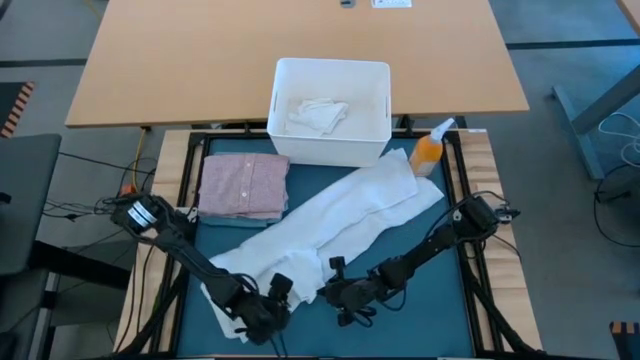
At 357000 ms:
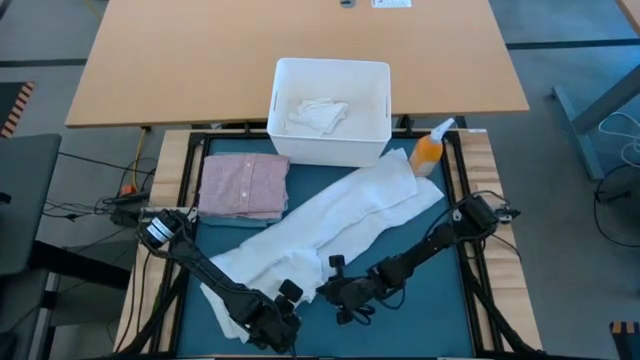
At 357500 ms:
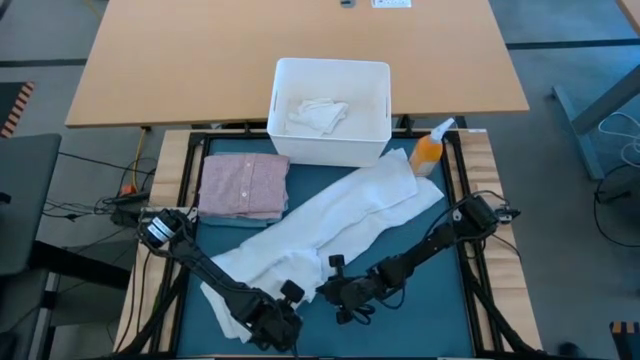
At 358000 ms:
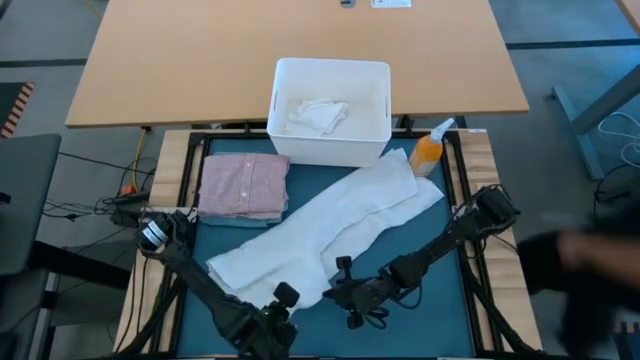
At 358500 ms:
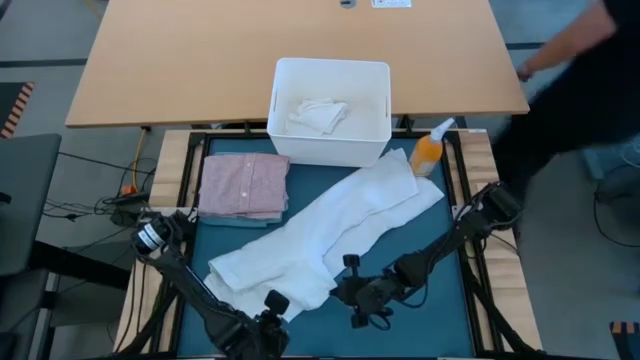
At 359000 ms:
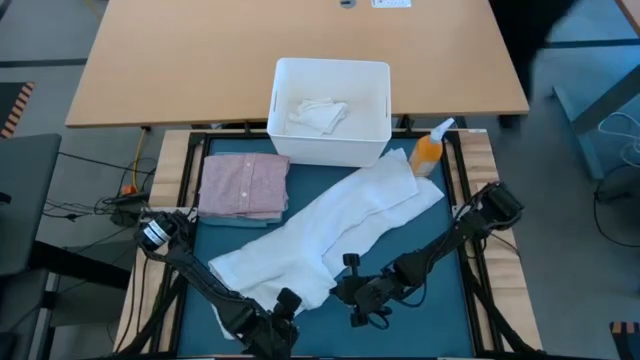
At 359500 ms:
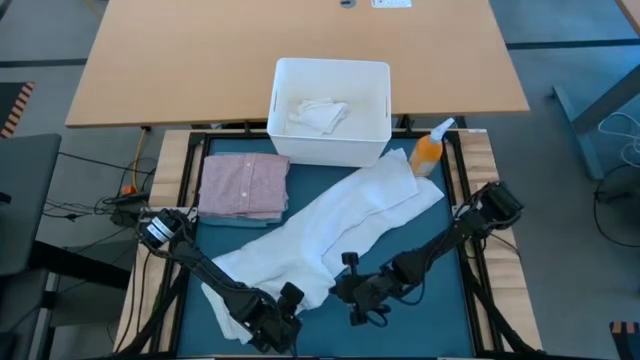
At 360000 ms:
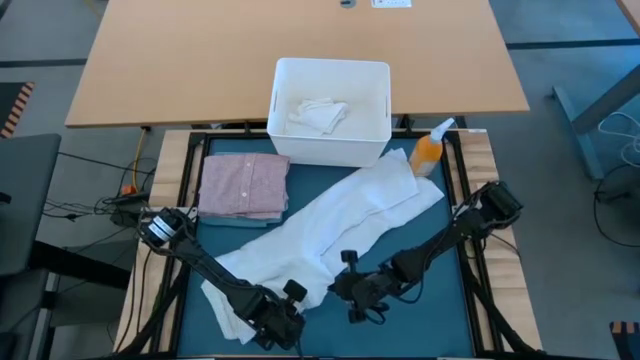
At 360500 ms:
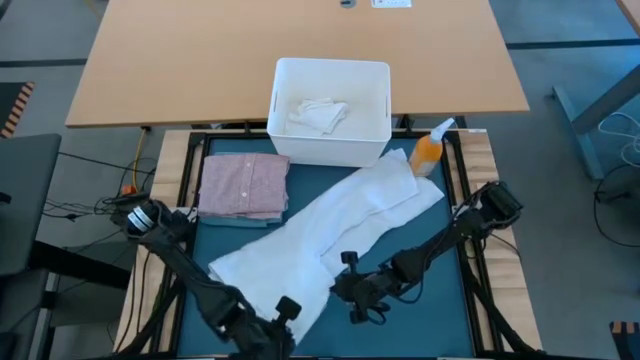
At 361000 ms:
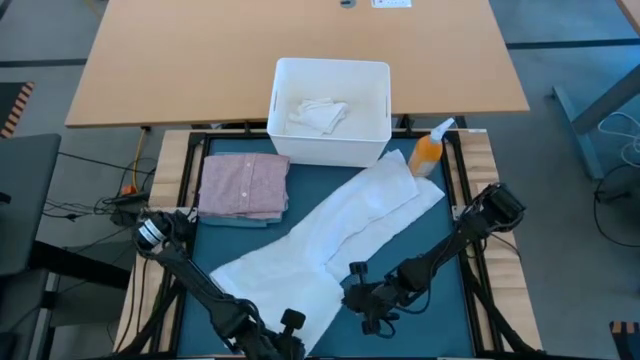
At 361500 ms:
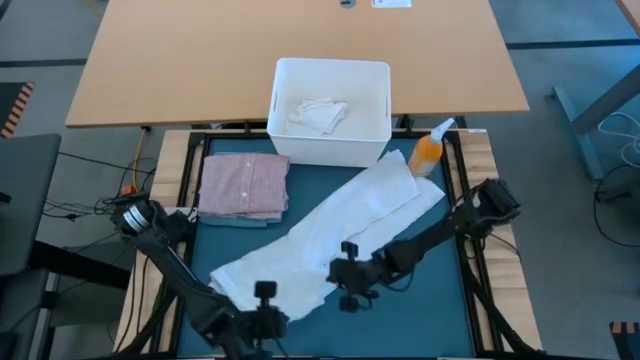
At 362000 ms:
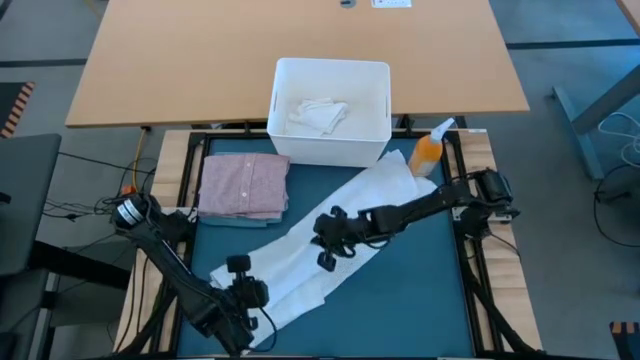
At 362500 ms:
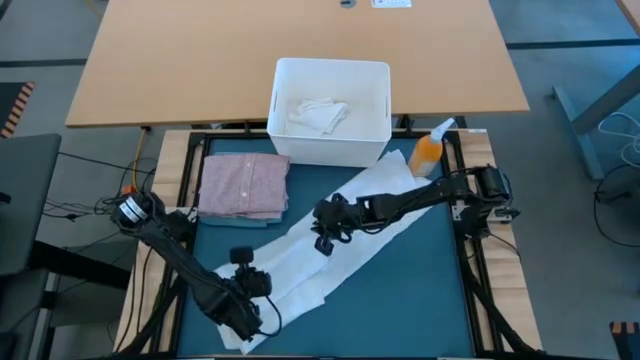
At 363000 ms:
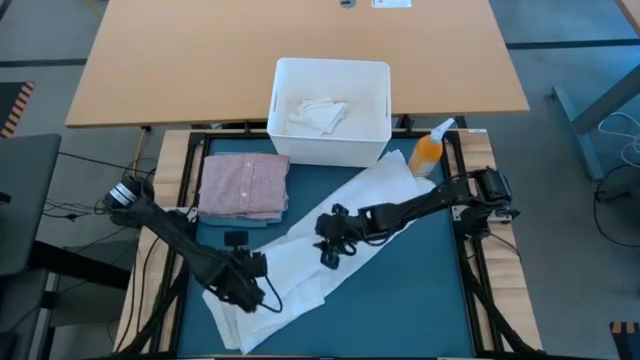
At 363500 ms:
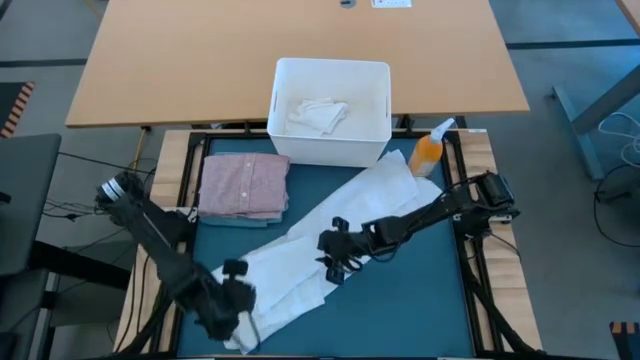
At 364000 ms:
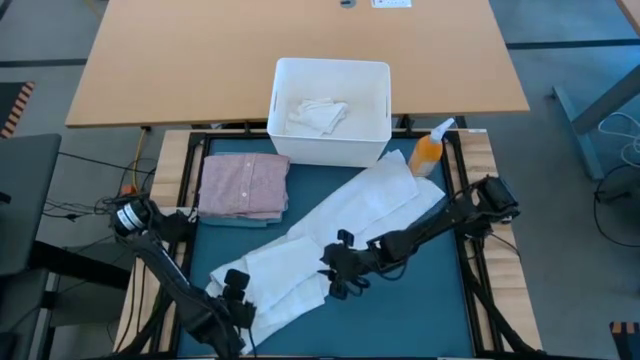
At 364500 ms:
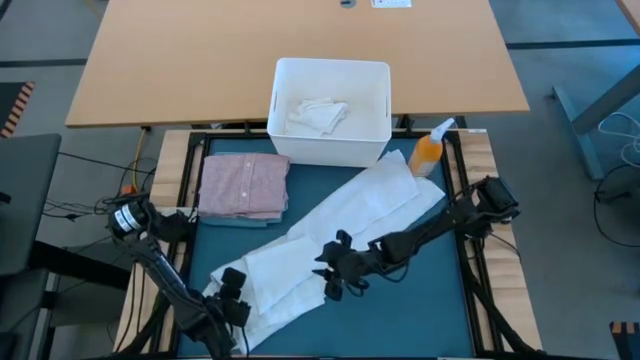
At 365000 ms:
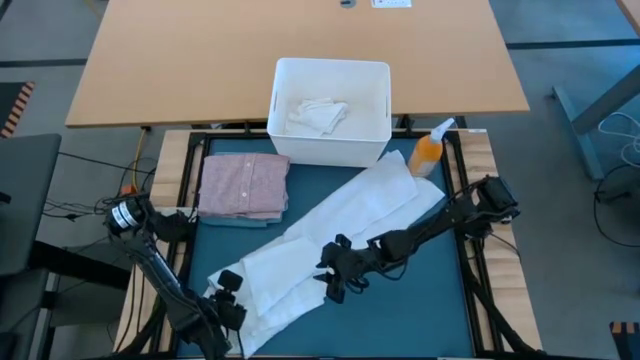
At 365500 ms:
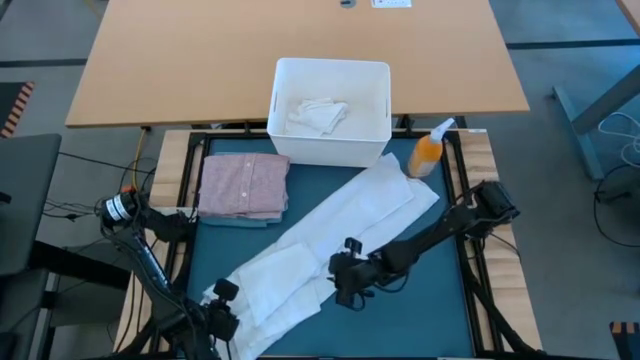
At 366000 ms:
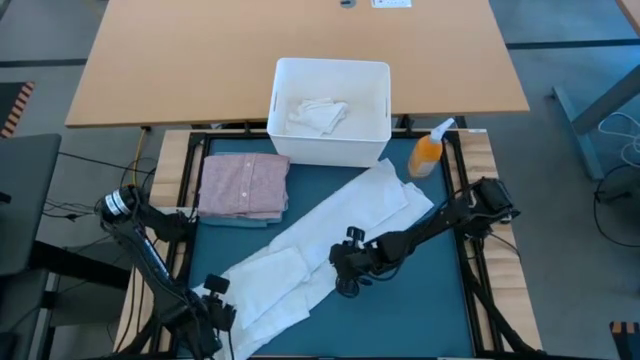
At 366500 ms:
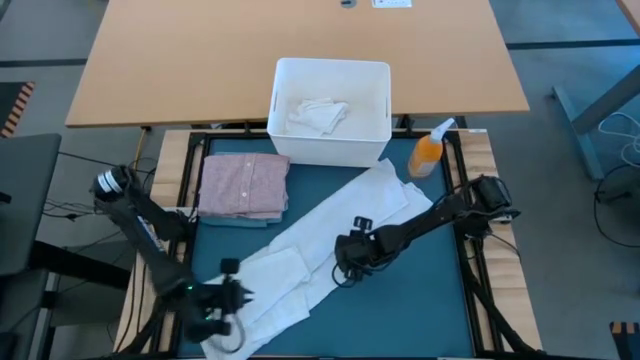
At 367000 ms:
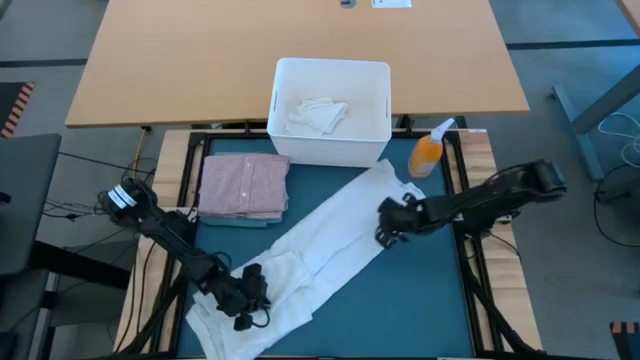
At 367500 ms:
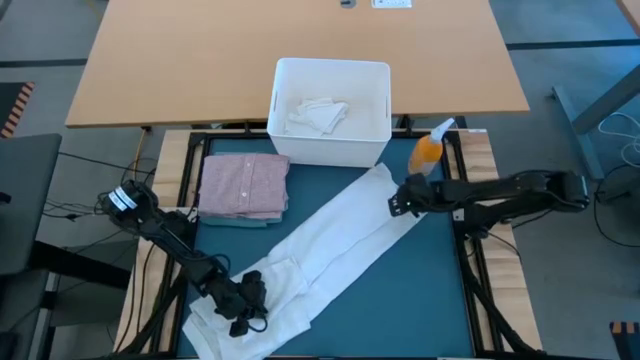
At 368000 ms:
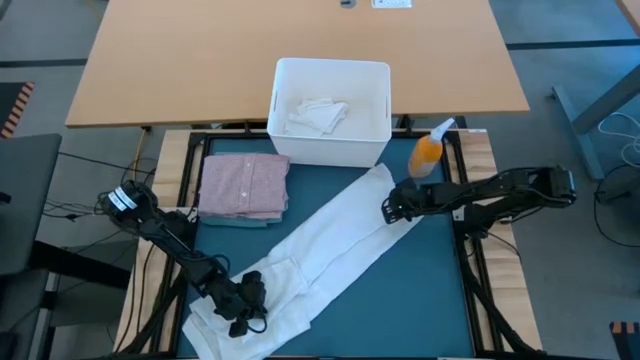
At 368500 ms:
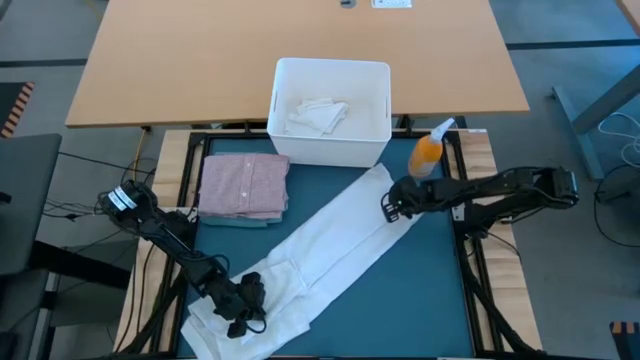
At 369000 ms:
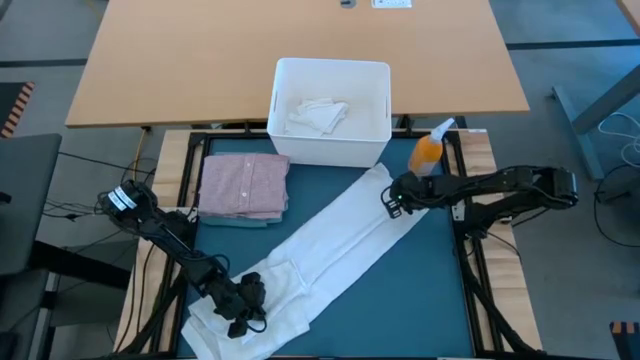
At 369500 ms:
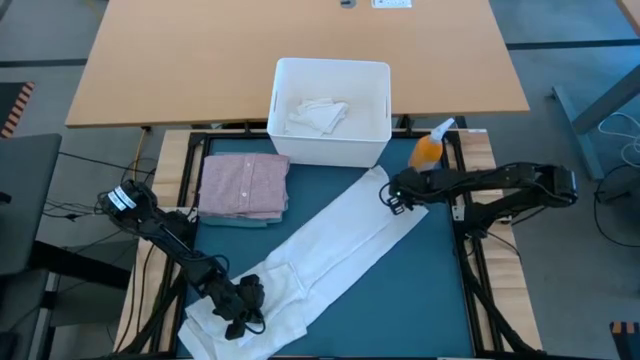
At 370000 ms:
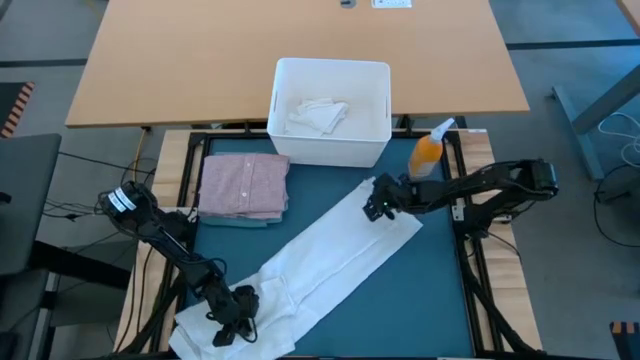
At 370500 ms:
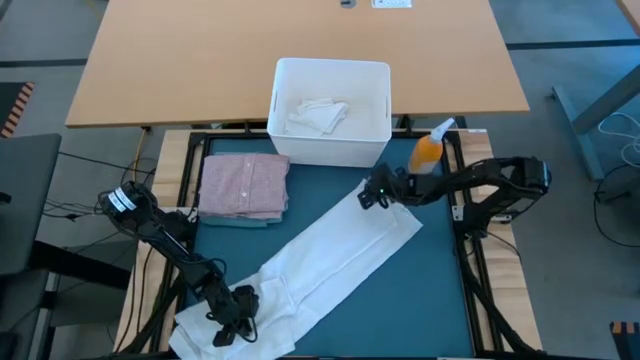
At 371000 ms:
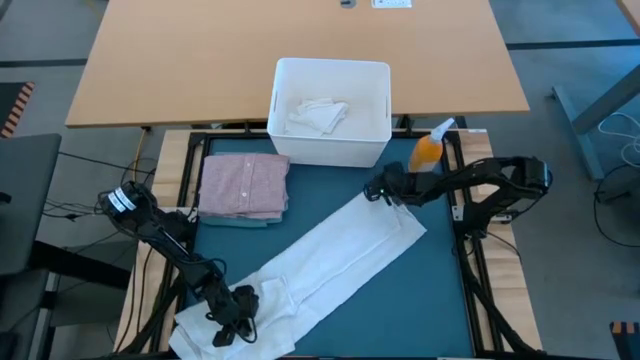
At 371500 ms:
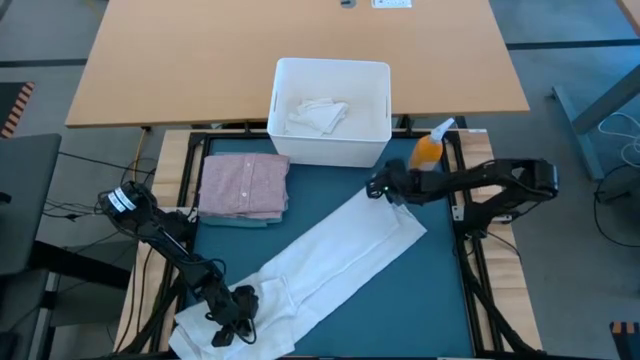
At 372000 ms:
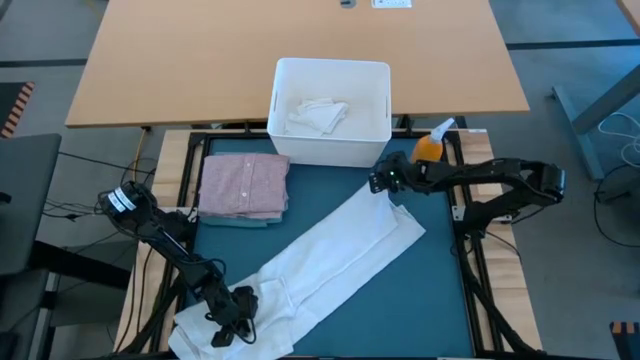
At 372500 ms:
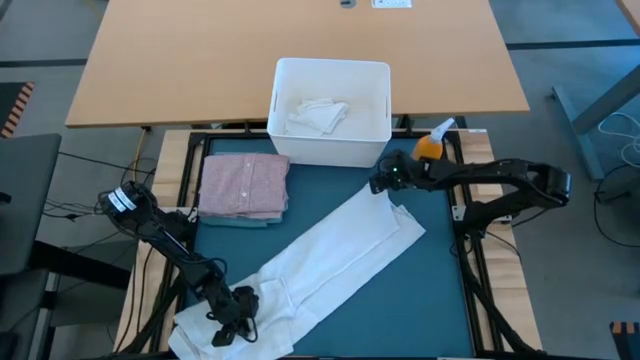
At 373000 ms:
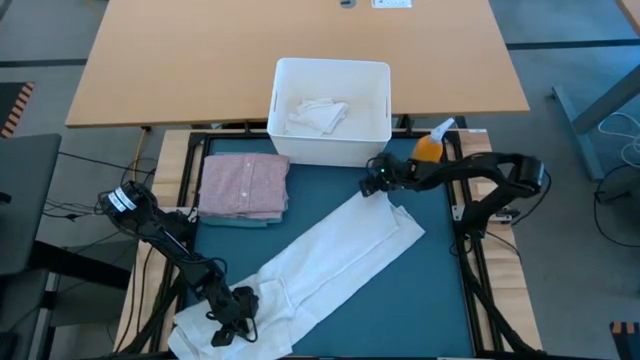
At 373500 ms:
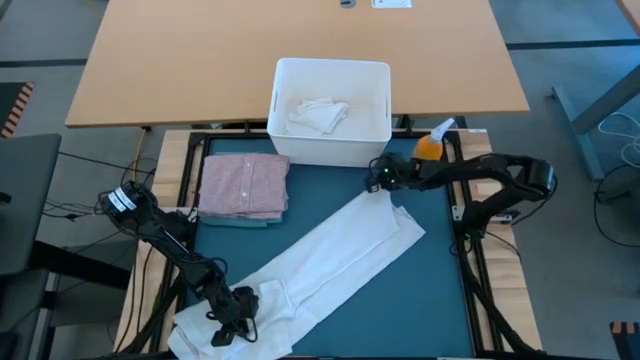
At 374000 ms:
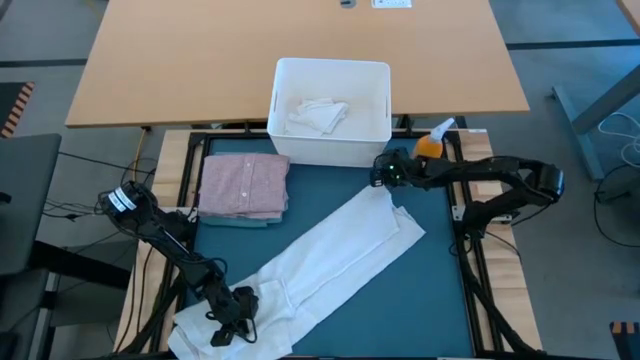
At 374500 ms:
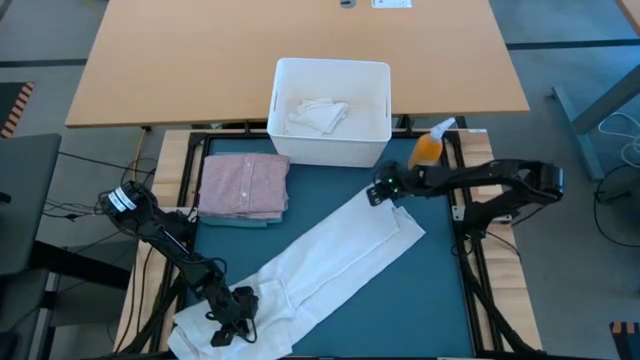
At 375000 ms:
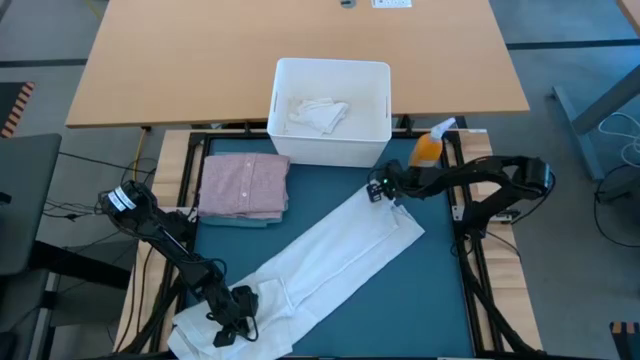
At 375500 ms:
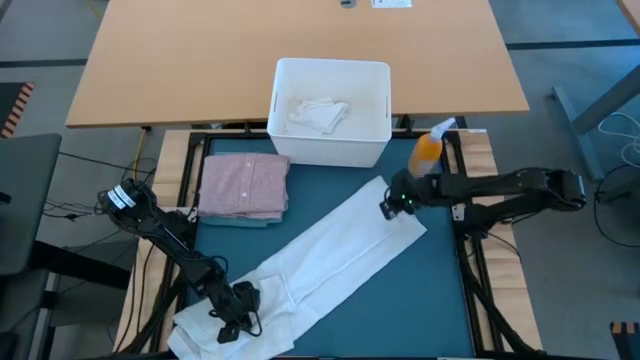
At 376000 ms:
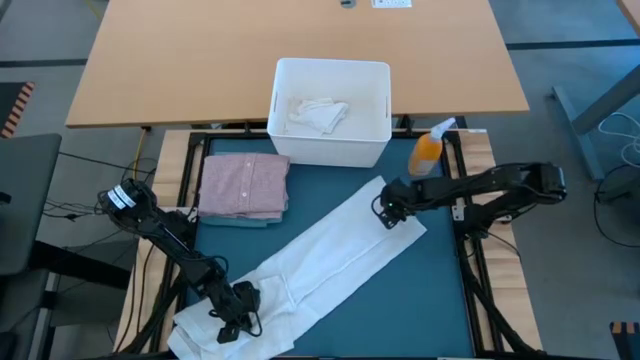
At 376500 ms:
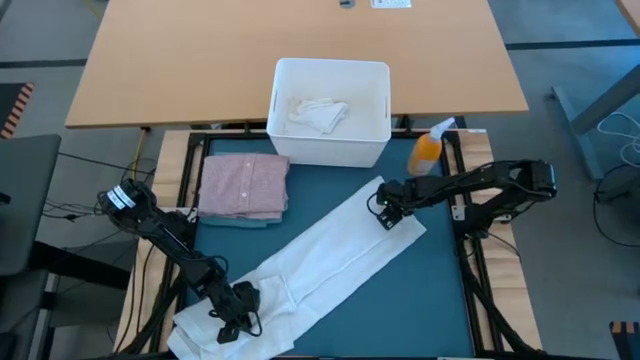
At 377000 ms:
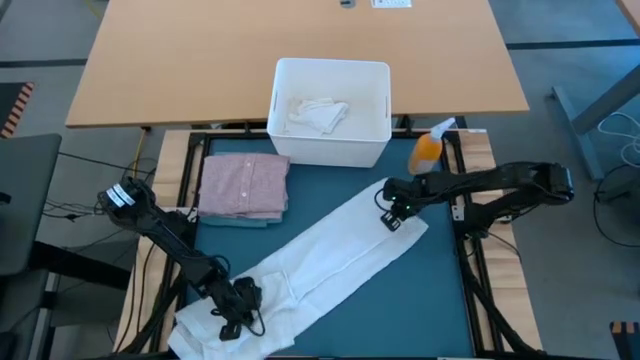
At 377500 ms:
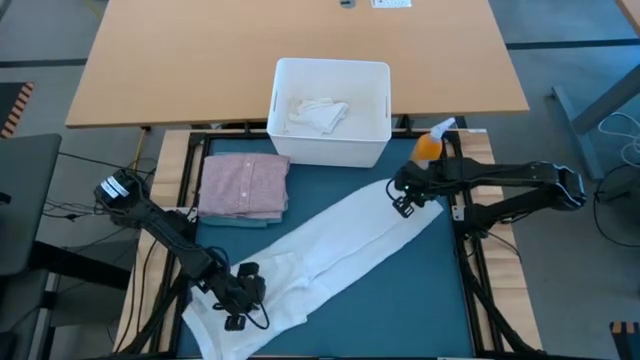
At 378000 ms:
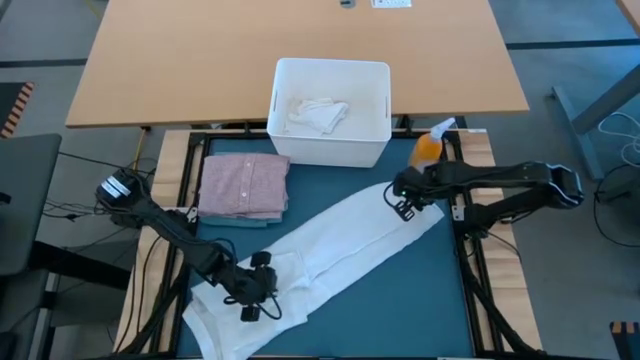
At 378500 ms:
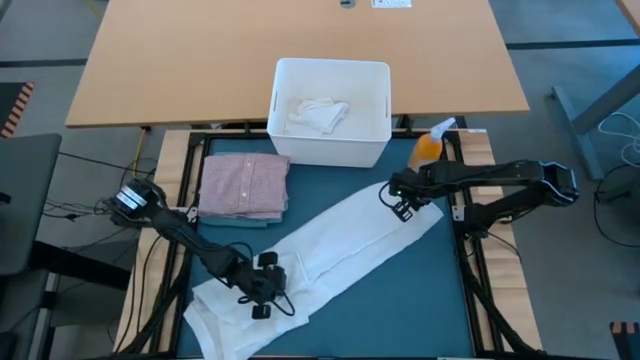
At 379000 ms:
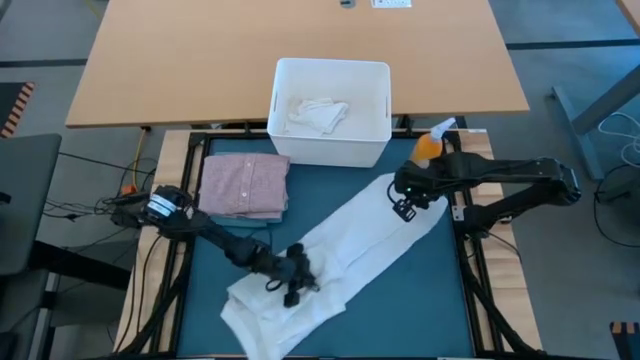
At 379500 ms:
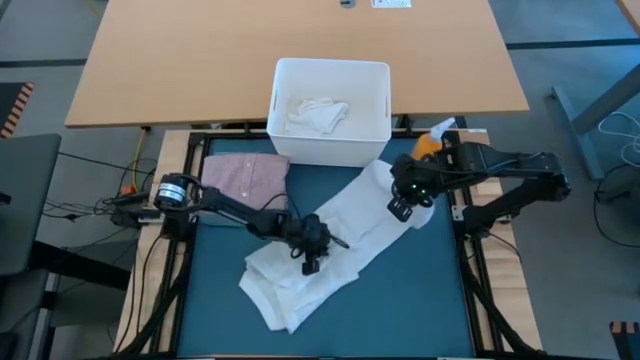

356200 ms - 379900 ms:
Task: Fold Laundry from Bin
Fold the white shirt
